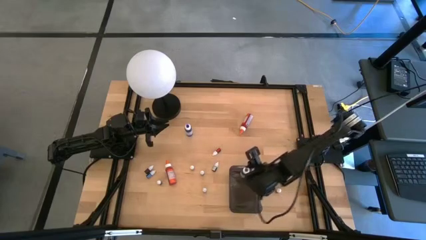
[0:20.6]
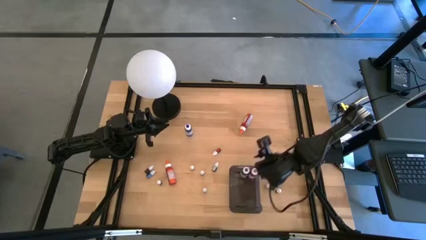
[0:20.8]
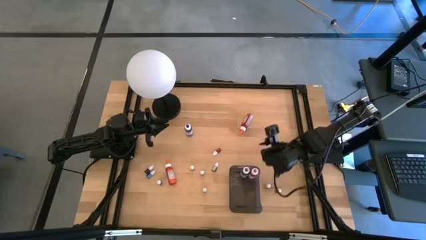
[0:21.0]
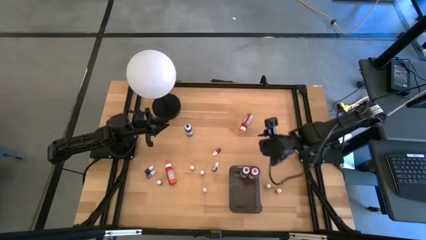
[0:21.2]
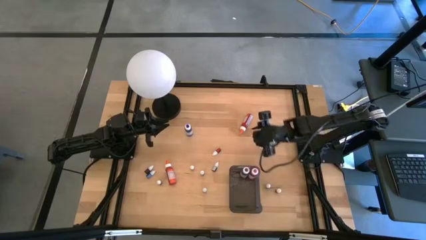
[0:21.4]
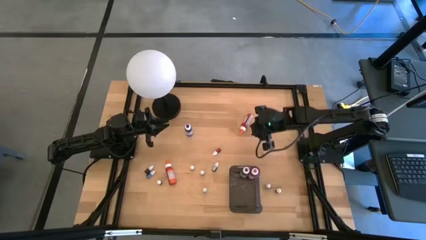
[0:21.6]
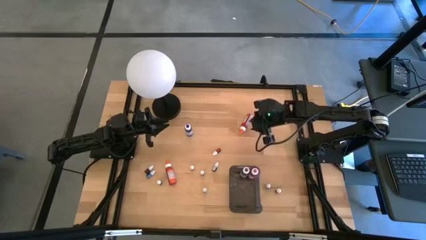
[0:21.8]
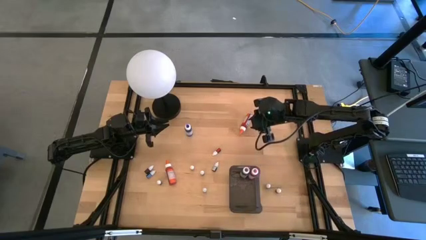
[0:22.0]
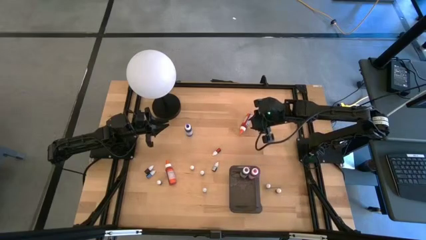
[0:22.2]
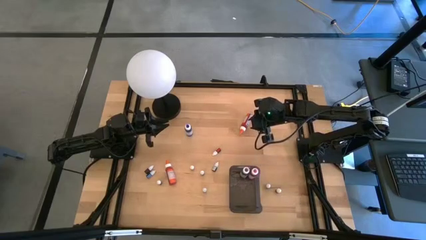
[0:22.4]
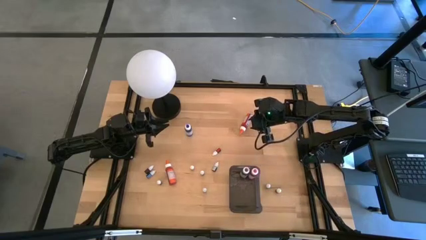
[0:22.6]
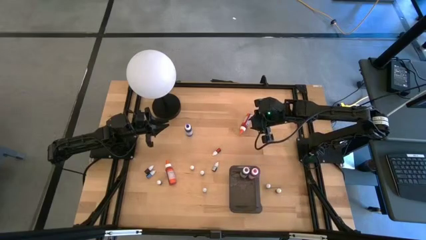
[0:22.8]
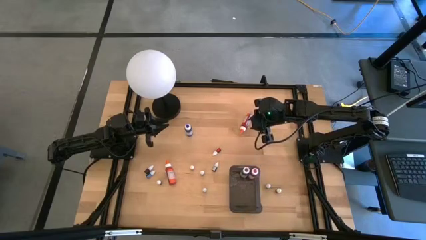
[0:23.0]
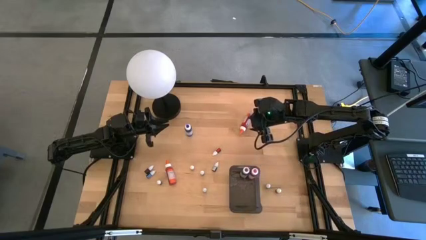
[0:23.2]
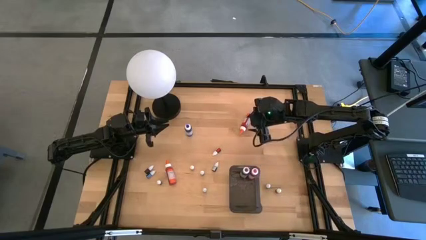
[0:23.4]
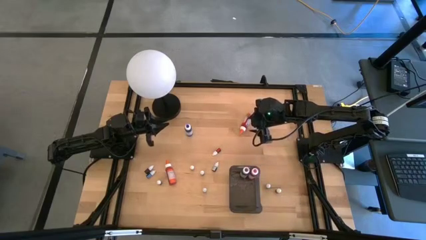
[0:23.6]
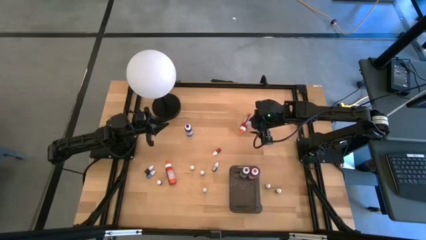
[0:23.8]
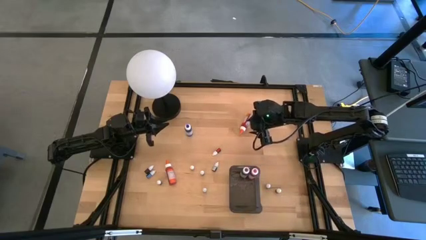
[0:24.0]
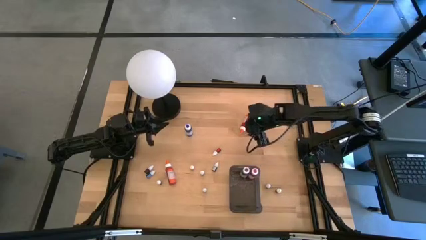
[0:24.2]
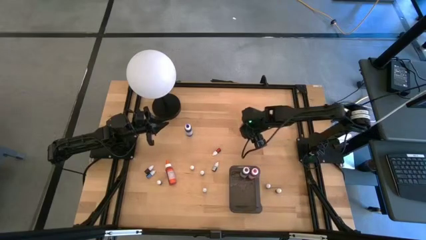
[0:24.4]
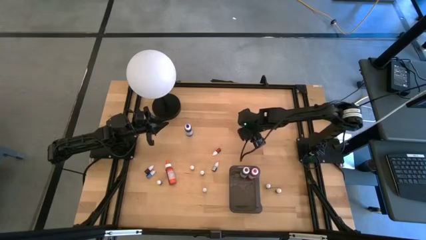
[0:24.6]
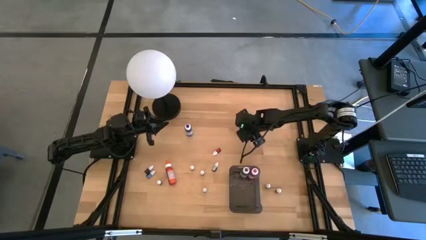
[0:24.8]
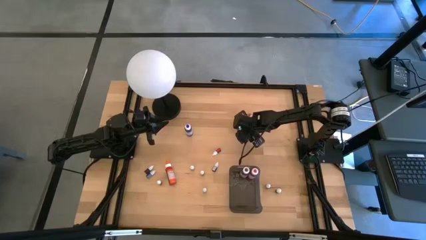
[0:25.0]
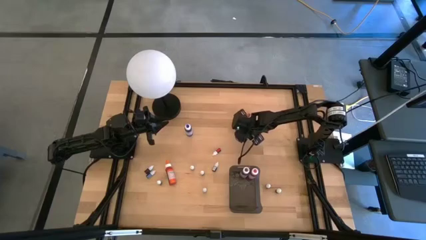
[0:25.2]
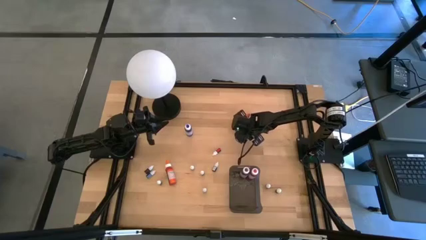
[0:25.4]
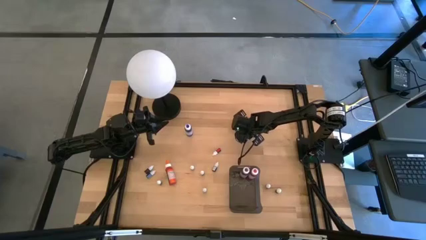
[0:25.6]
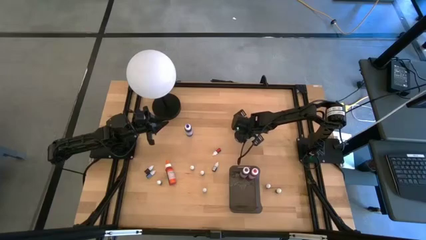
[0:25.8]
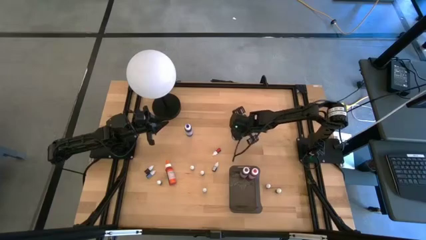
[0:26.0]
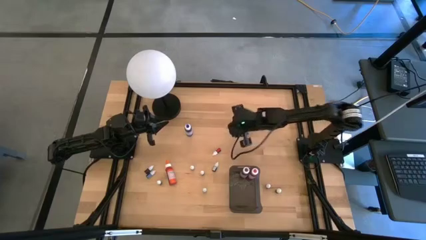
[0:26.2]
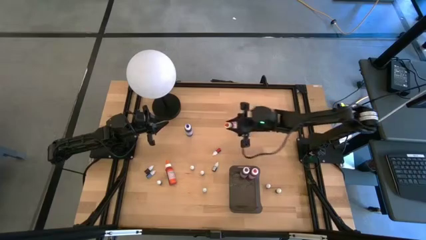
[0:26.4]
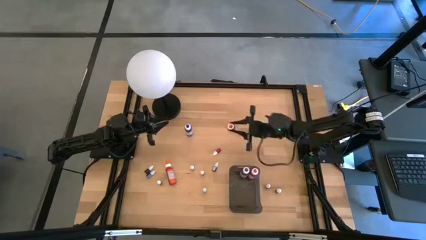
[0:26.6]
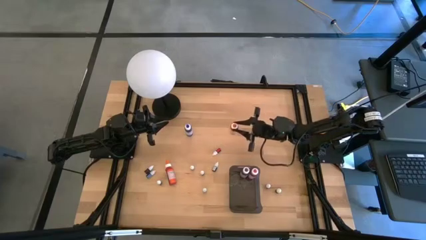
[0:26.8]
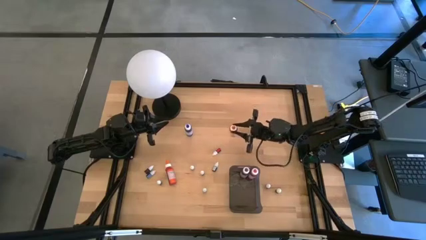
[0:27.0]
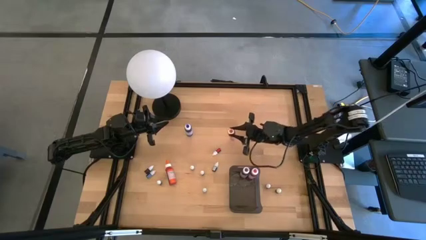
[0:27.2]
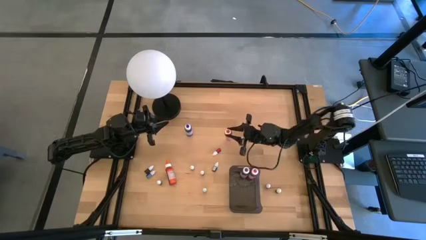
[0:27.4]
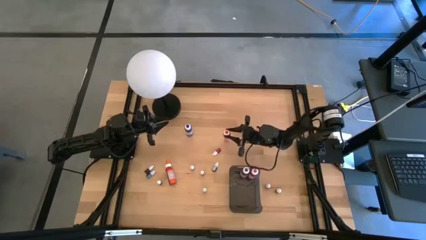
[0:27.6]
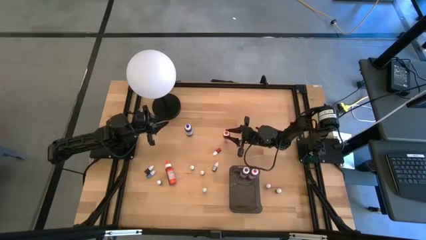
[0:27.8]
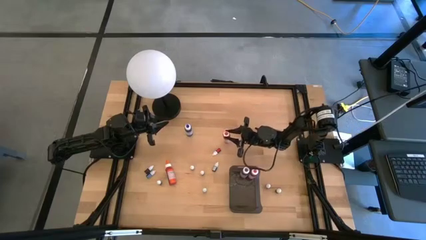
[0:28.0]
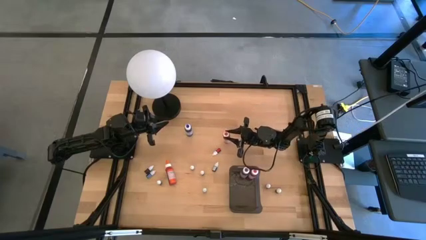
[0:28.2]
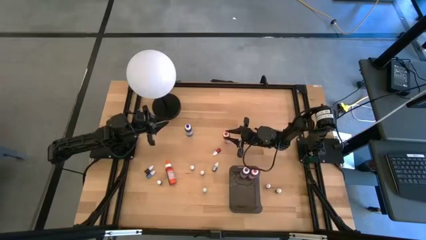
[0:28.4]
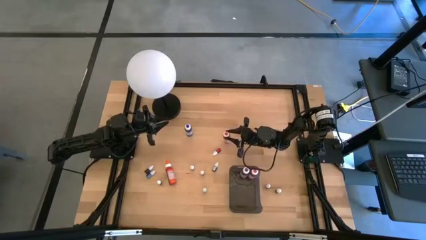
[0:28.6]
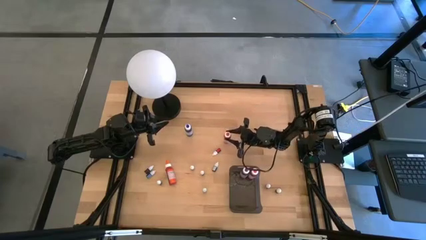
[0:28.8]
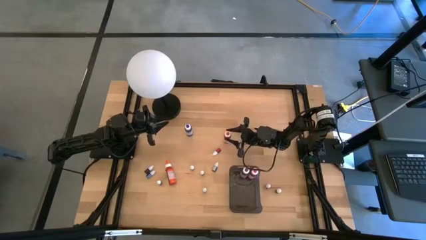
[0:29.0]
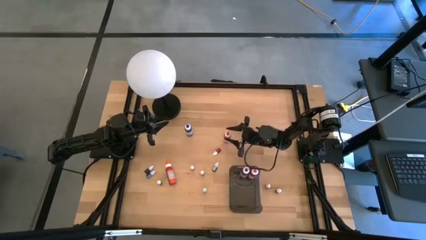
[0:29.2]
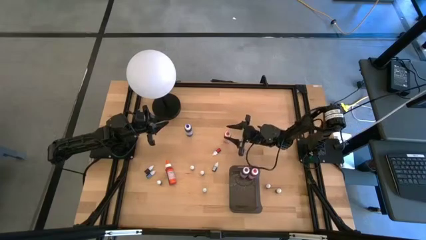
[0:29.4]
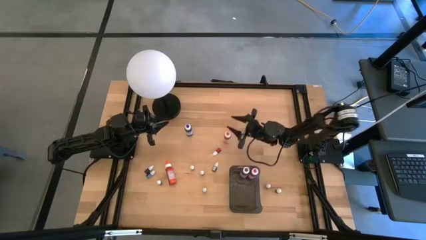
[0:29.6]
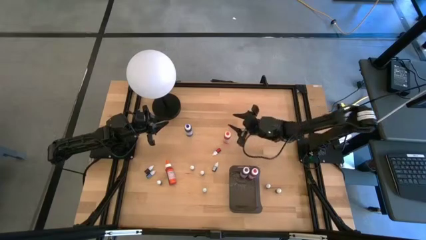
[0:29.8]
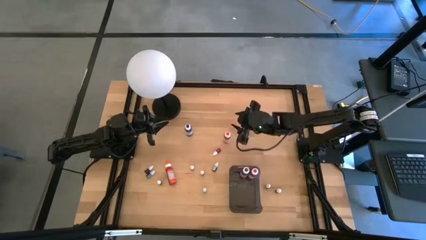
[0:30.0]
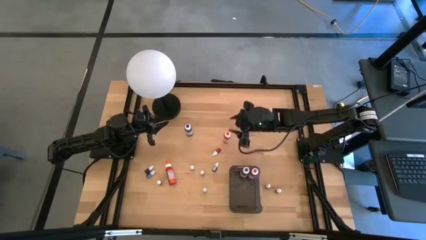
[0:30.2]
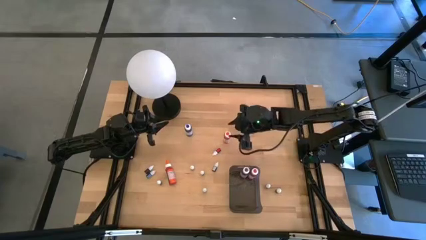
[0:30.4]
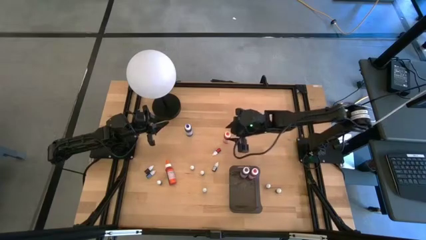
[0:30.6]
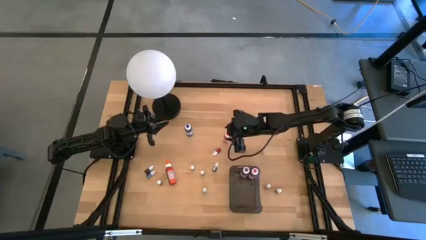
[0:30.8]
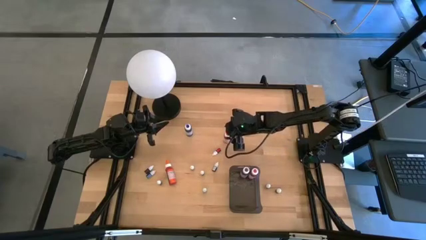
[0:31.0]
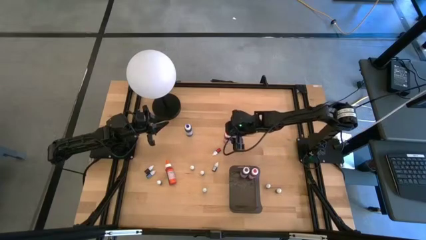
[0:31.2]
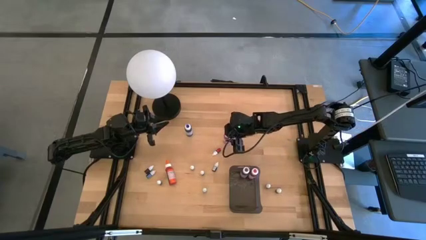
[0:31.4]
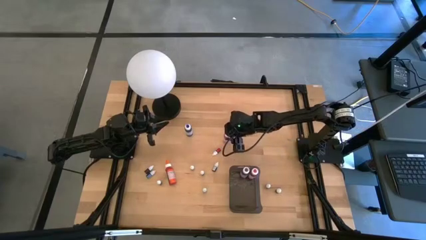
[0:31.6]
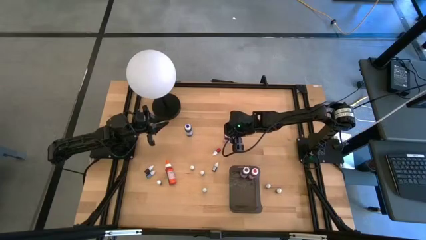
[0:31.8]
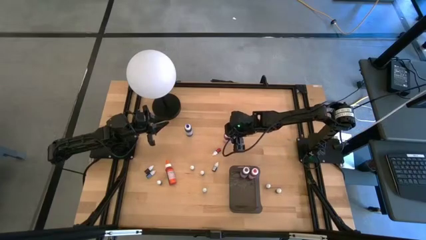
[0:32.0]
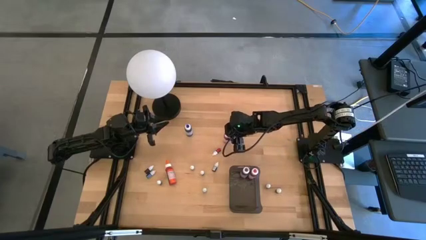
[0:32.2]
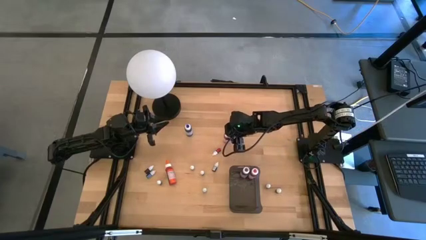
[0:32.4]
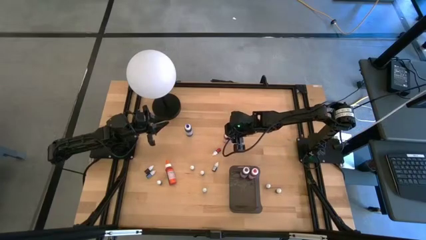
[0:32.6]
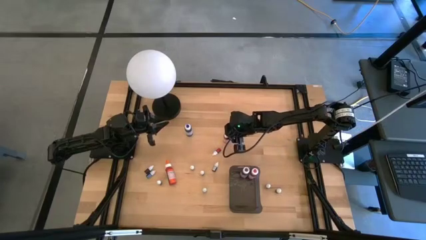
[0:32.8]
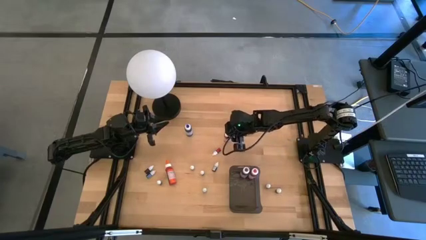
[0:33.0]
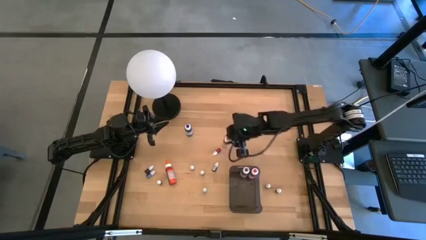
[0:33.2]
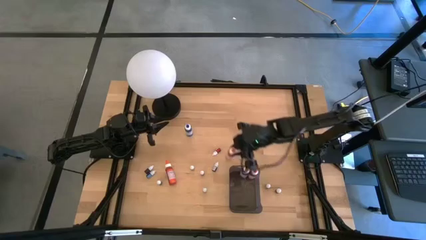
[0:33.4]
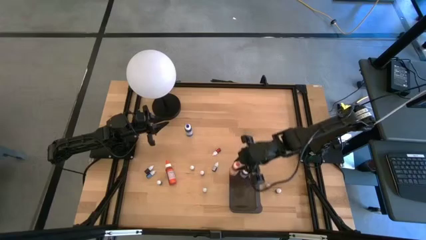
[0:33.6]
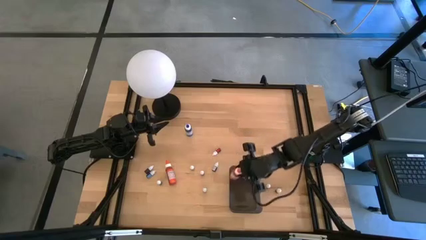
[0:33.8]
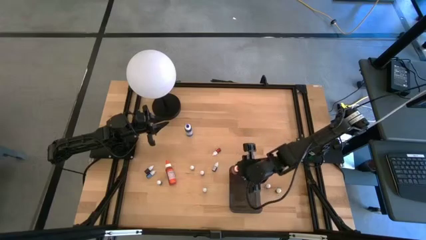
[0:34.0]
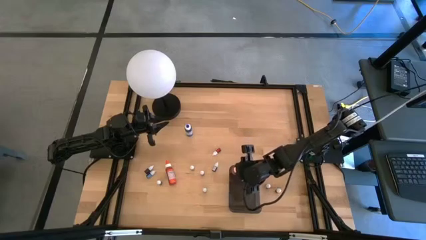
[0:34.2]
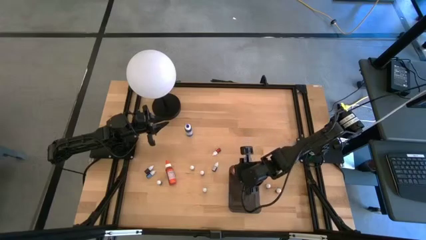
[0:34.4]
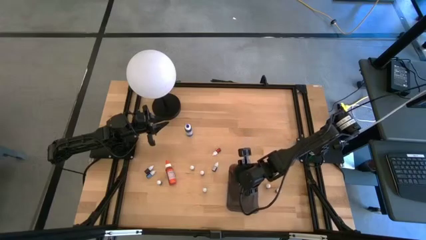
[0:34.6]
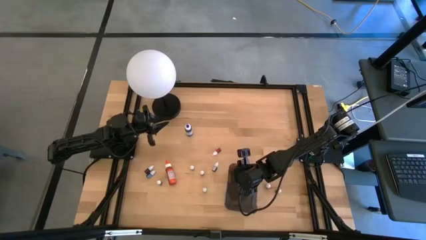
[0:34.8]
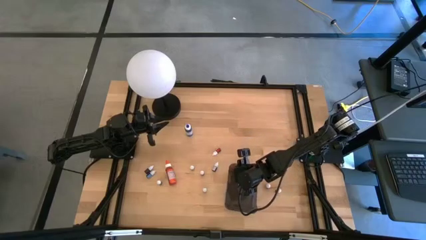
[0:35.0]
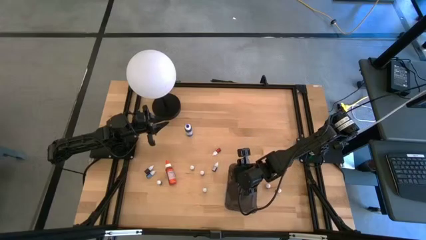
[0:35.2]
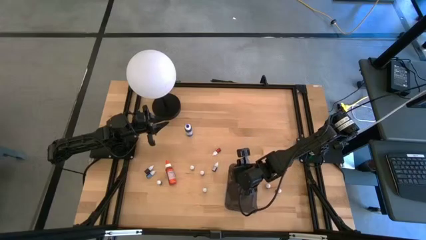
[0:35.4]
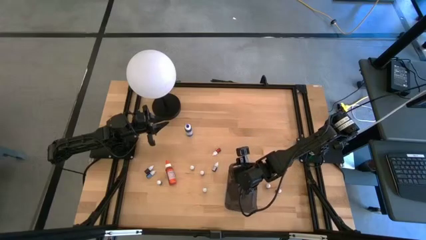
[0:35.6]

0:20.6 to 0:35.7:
Task: Pick & Place food coloring
Put the large orange food coloring bottle into the black bin

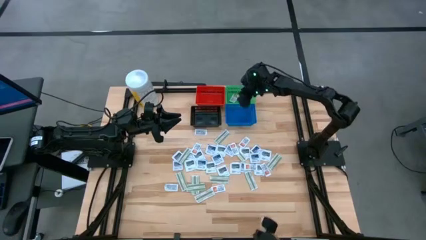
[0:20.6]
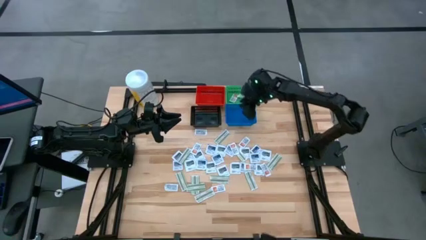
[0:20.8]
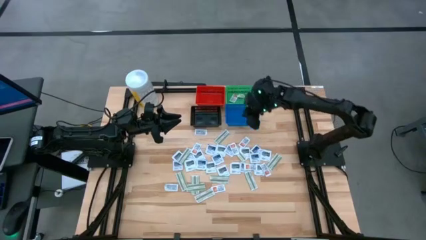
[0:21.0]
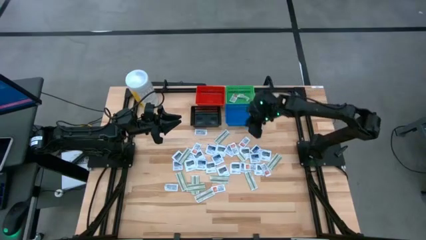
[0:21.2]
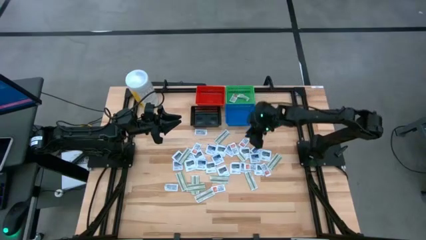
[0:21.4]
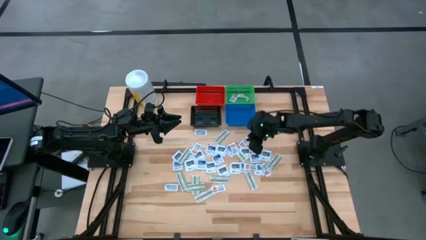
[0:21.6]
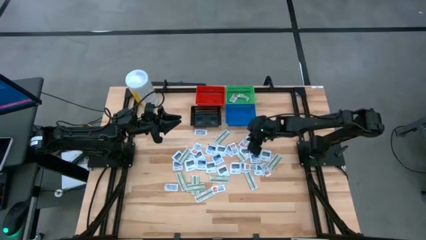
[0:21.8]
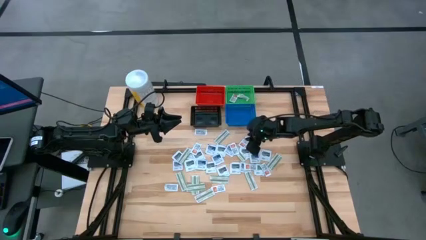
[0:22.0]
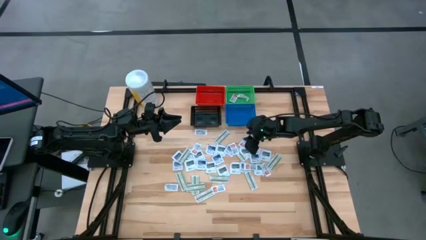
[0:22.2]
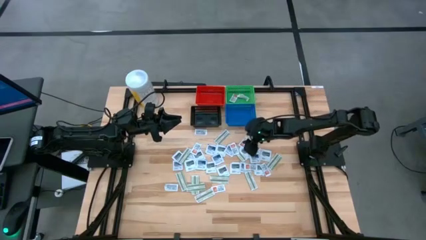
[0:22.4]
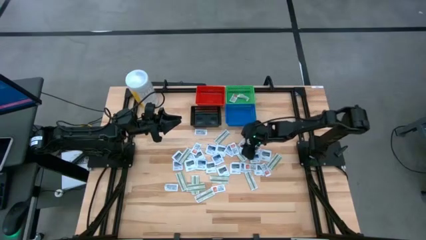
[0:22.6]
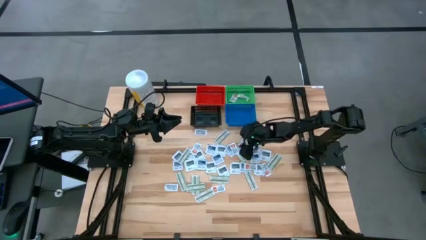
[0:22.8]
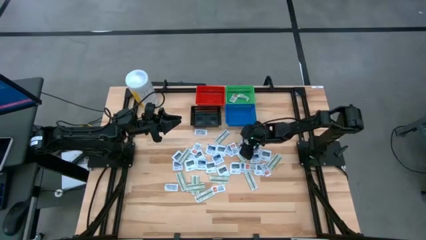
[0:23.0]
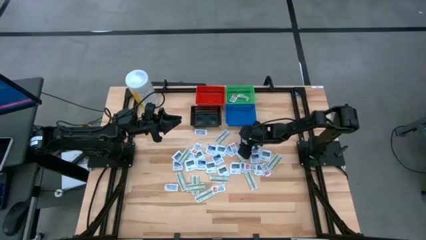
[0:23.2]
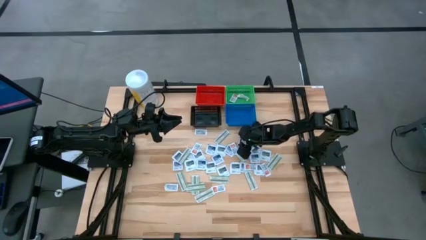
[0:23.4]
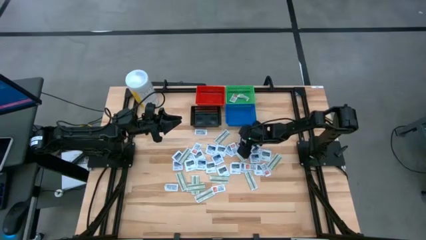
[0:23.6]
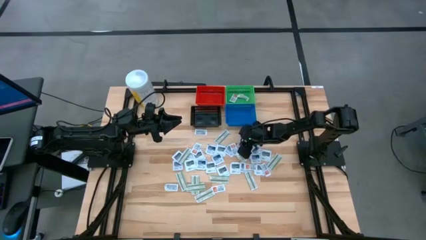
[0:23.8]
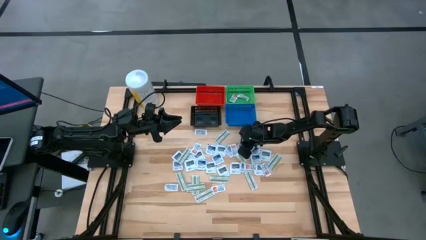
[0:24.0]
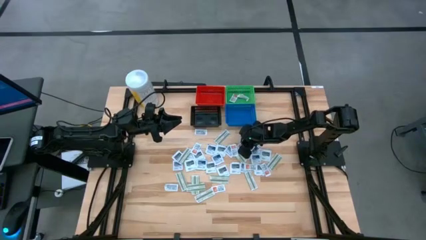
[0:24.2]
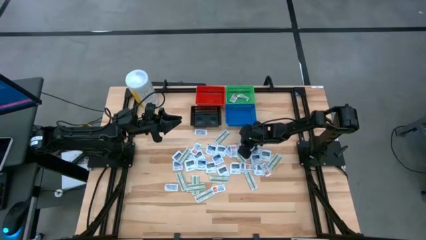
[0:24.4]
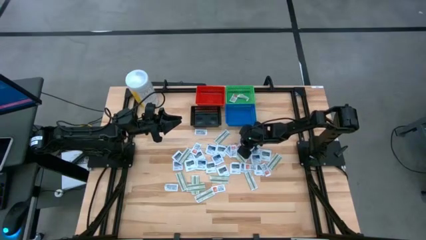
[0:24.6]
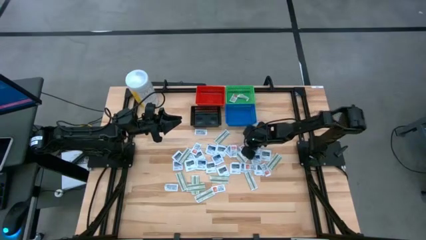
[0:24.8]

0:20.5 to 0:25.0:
Task: Pick & Place First Aid Supplies
Put the ointment pack into the green basket
